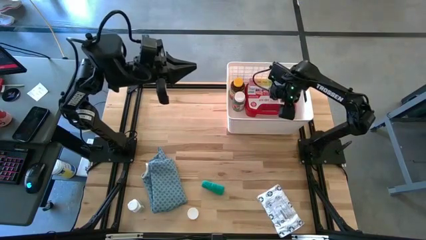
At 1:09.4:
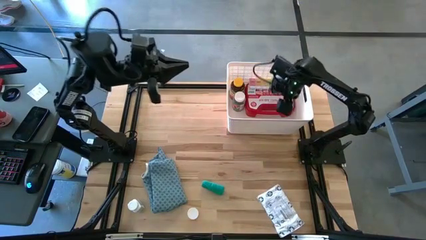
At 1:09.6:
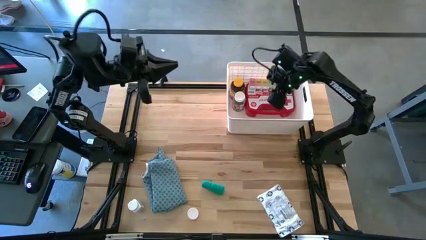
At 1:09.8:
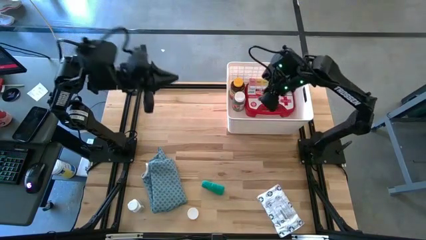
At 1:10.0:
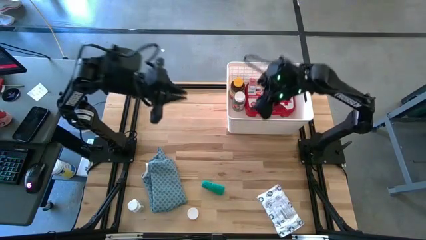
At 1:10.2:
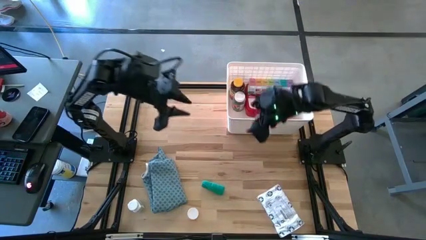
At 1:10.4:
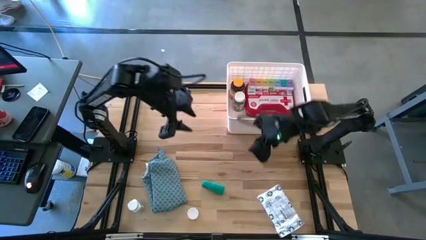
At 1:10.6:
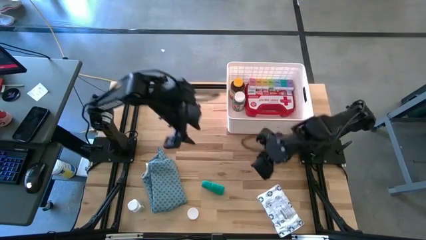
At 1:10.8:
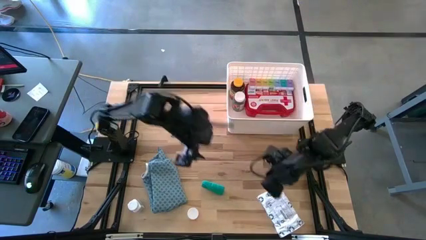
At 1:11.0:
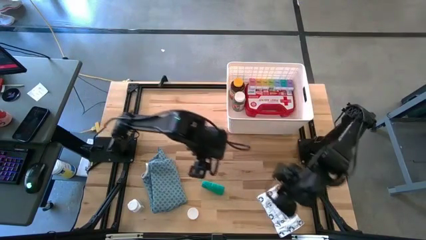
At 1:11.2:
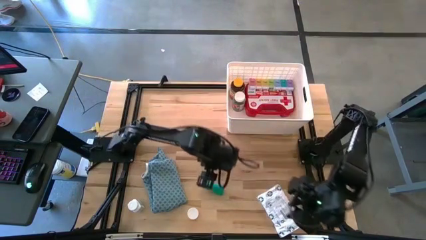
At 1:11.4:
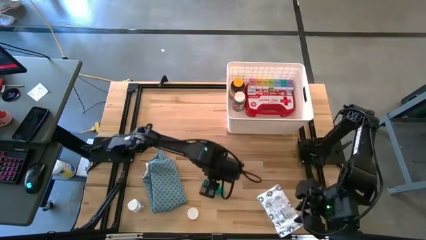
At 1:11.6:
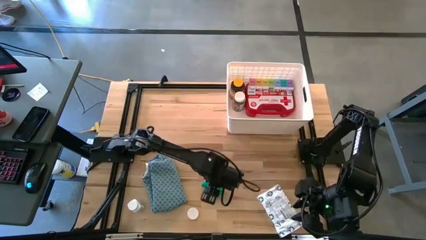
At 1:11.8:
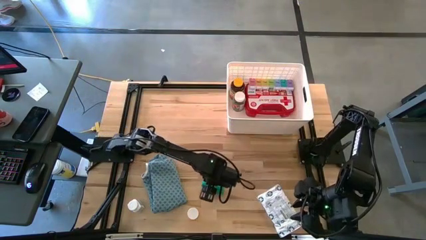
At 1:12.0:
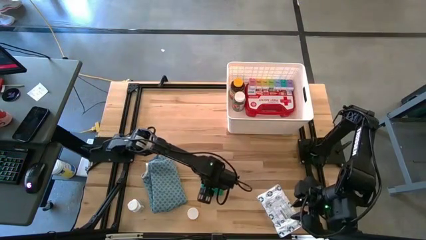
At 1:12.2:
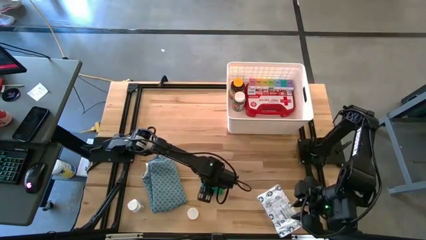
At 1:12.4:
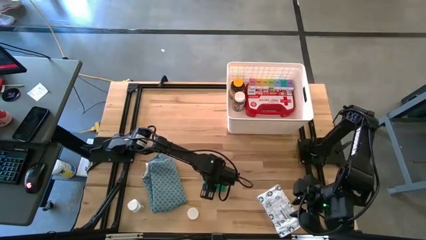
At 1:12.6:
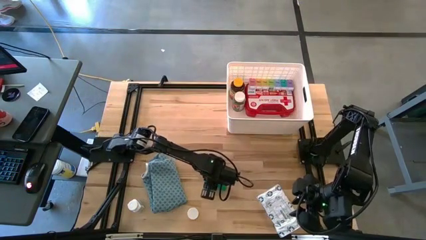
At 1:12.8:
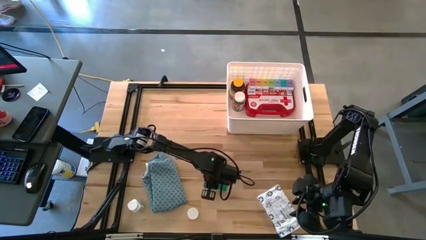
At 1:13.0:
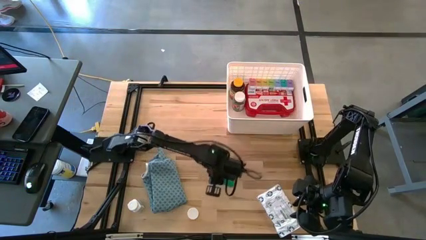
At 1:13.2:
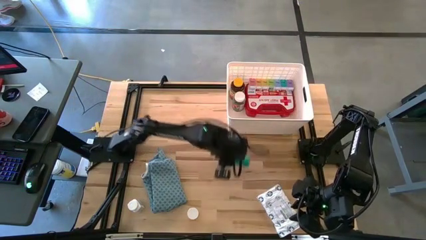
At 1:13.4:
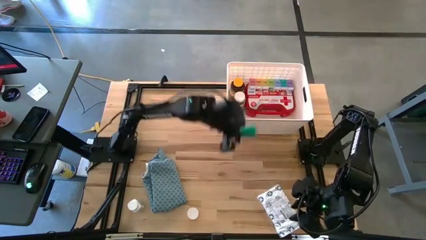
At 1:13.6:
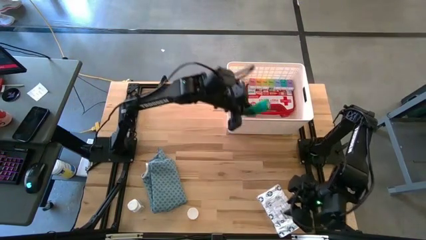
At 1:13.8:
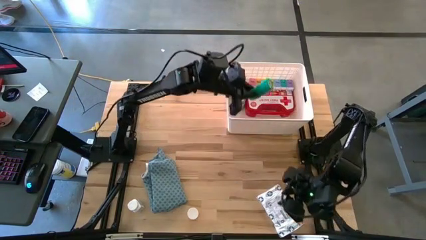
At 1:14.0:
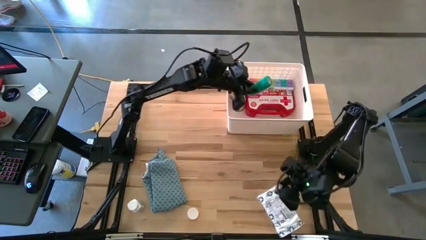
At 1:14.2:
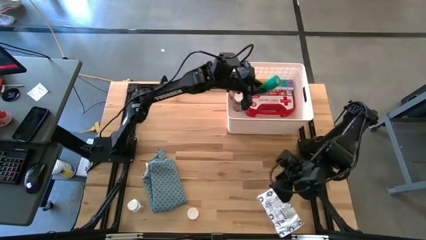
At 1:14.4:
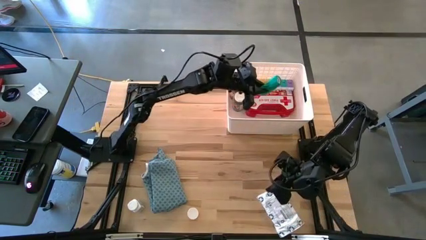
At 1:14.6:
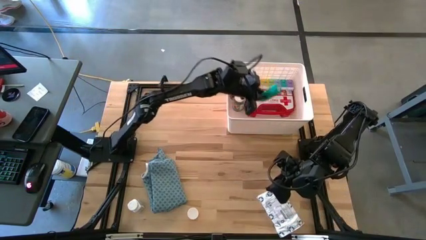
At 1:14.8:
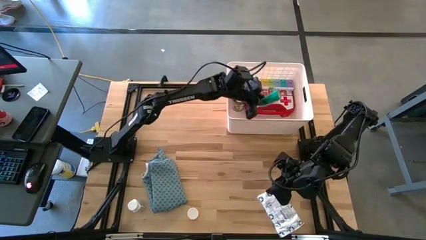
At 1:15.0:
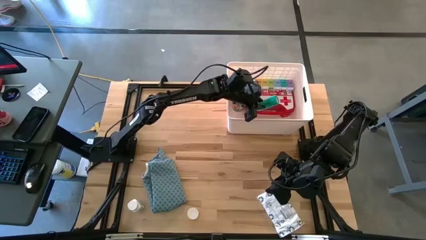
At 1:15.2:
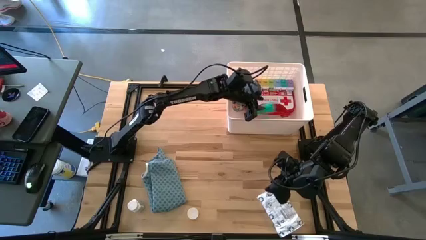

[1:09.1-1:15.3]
Task: Pick & place medical supplies in basket/bin
Put the light green bandage into the white bin

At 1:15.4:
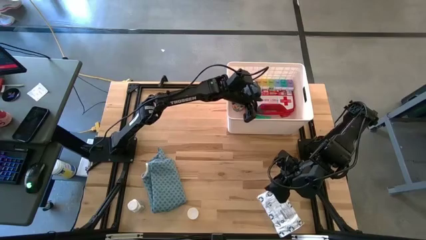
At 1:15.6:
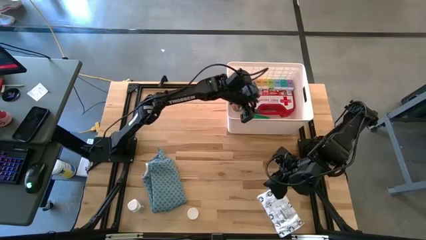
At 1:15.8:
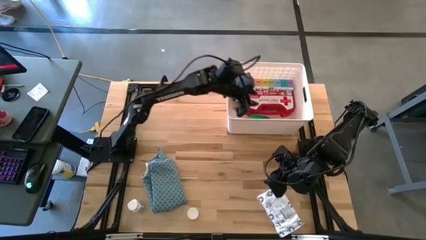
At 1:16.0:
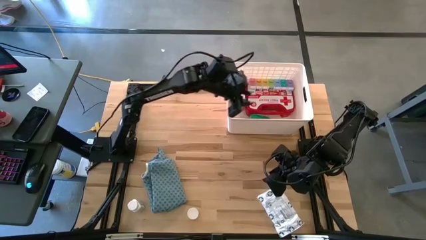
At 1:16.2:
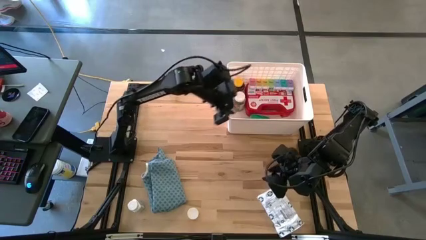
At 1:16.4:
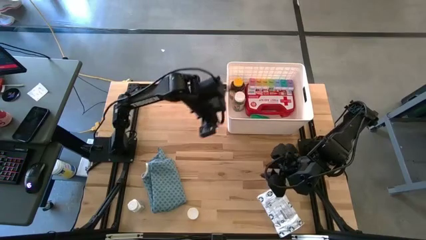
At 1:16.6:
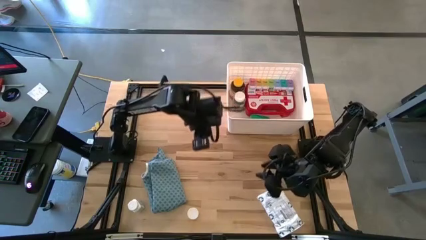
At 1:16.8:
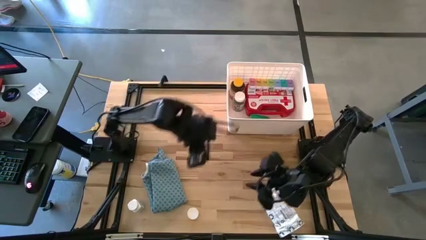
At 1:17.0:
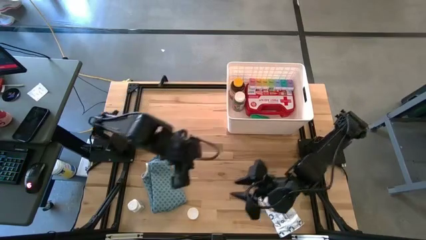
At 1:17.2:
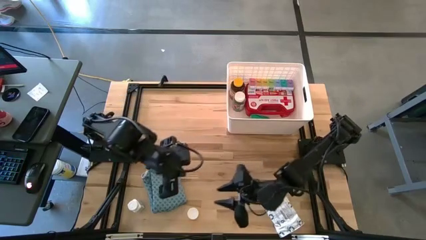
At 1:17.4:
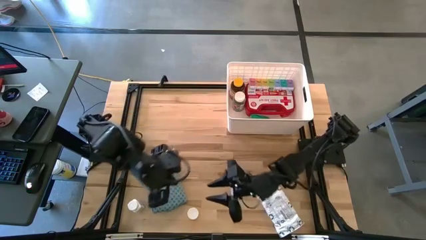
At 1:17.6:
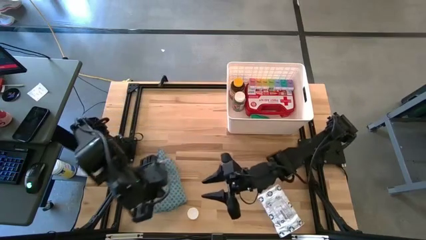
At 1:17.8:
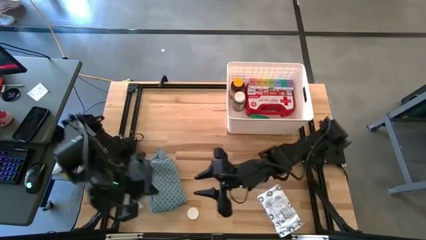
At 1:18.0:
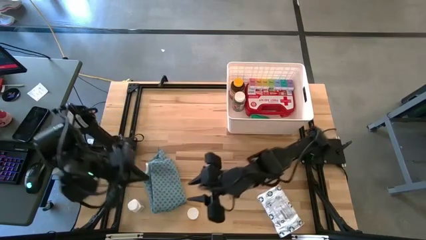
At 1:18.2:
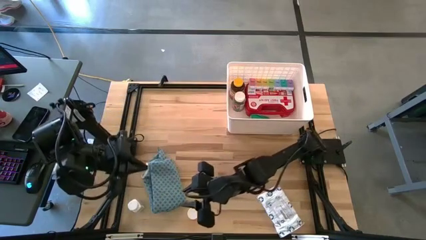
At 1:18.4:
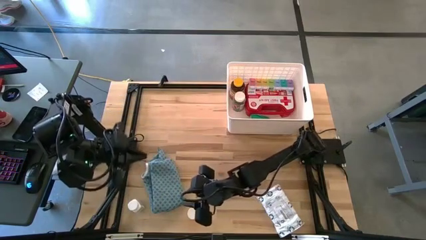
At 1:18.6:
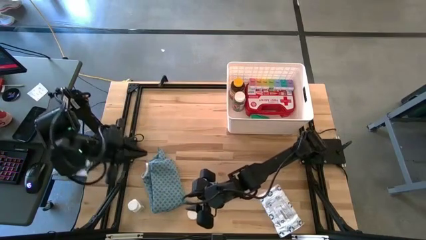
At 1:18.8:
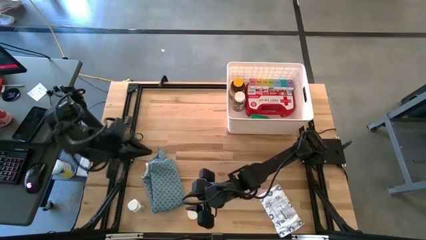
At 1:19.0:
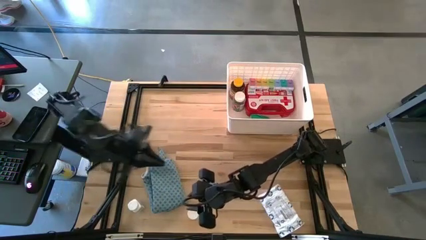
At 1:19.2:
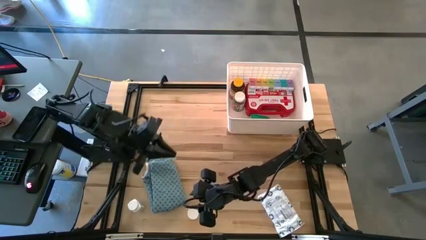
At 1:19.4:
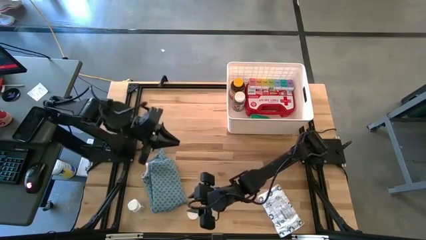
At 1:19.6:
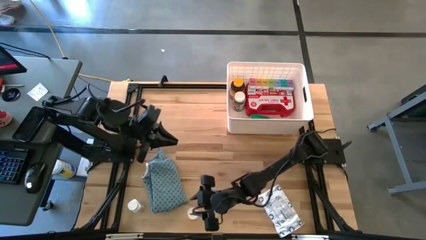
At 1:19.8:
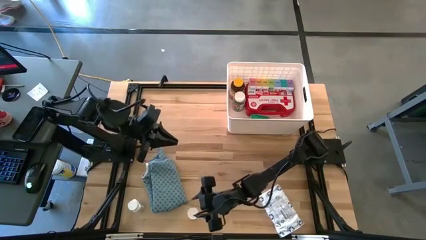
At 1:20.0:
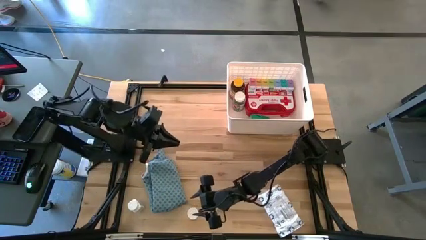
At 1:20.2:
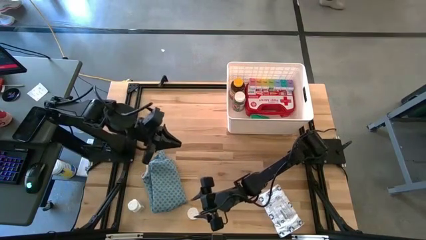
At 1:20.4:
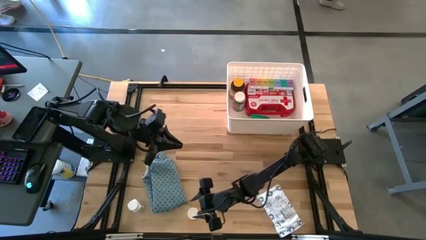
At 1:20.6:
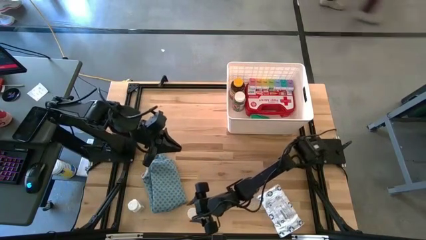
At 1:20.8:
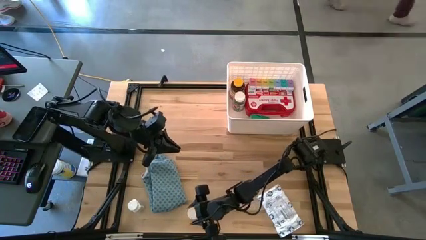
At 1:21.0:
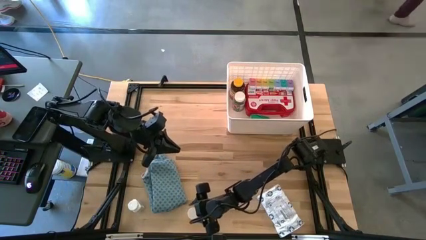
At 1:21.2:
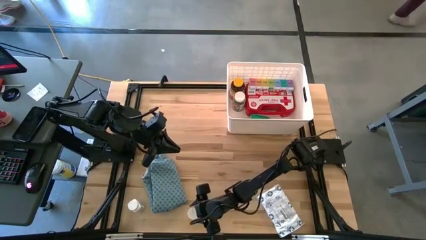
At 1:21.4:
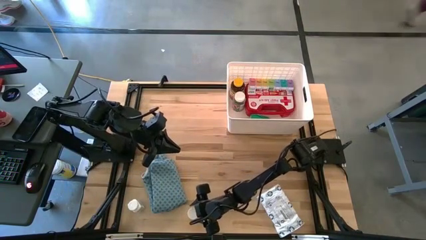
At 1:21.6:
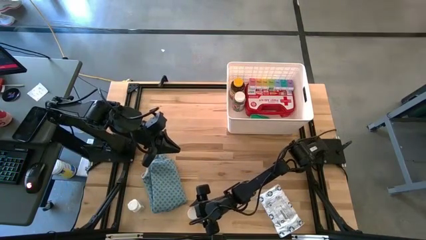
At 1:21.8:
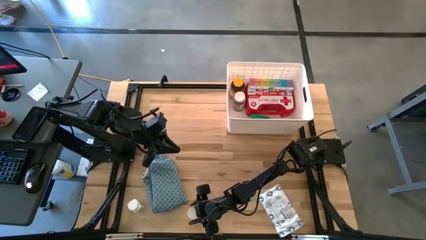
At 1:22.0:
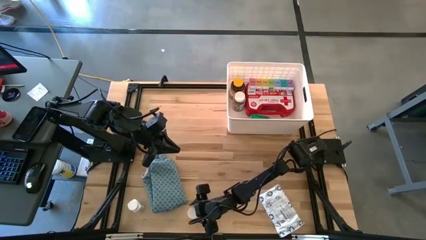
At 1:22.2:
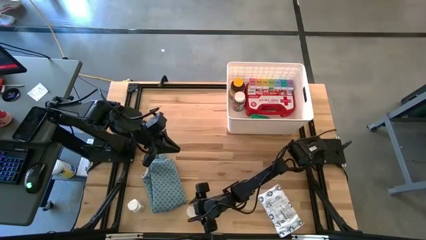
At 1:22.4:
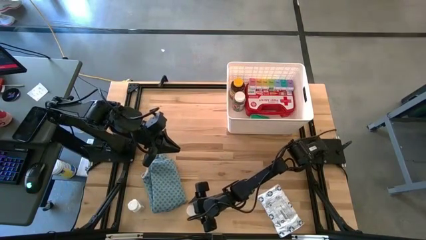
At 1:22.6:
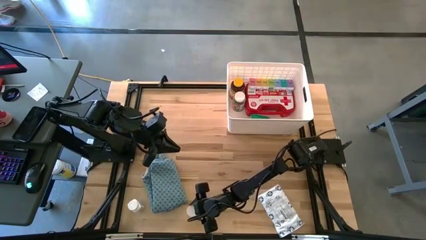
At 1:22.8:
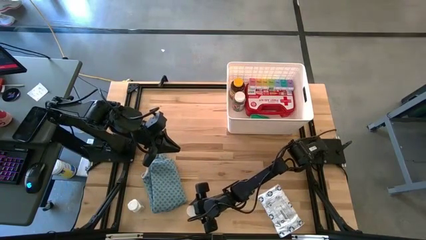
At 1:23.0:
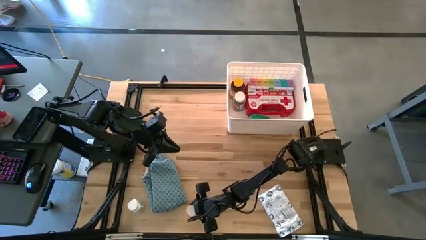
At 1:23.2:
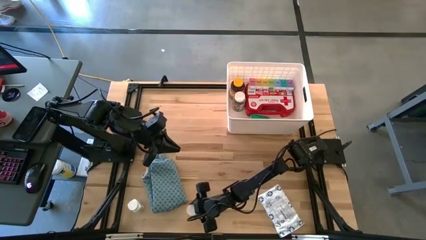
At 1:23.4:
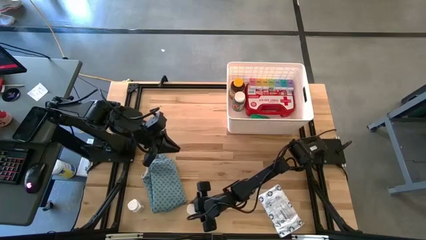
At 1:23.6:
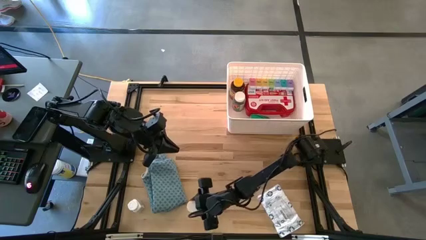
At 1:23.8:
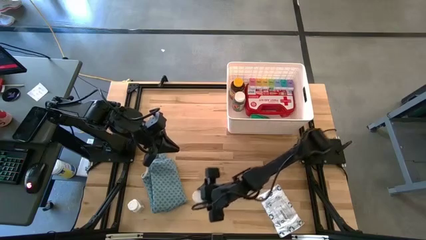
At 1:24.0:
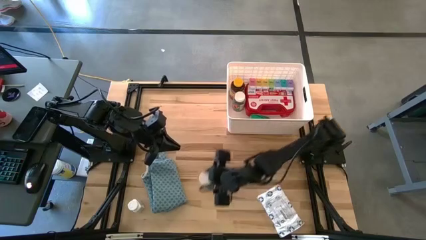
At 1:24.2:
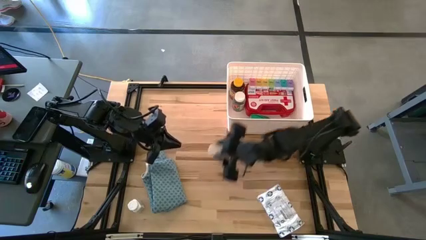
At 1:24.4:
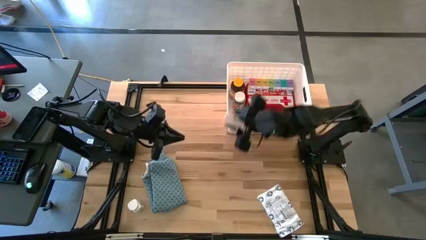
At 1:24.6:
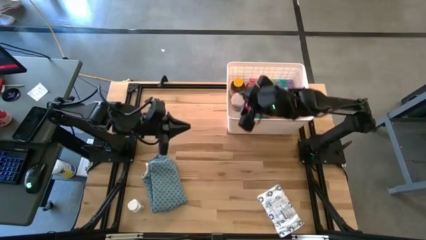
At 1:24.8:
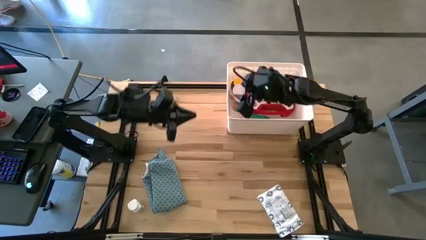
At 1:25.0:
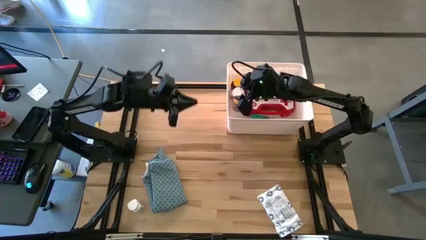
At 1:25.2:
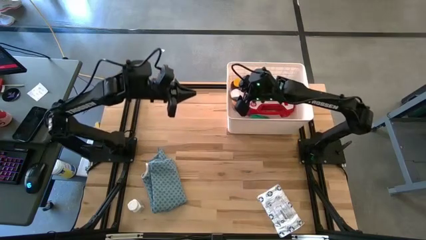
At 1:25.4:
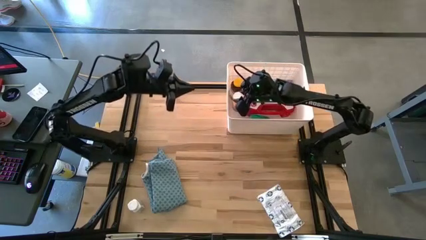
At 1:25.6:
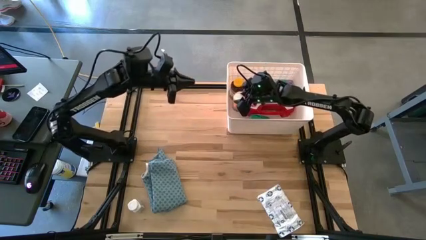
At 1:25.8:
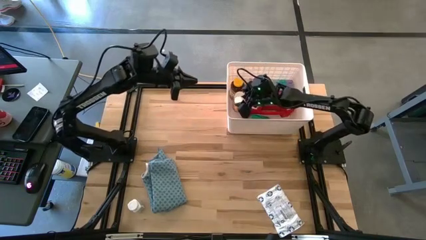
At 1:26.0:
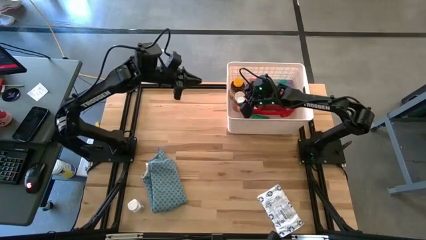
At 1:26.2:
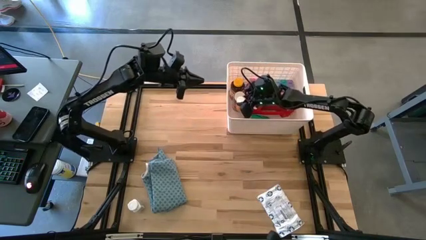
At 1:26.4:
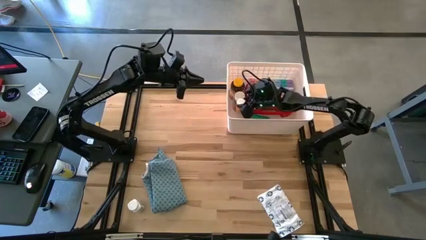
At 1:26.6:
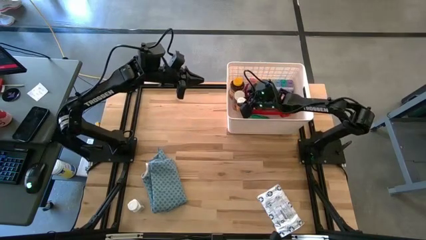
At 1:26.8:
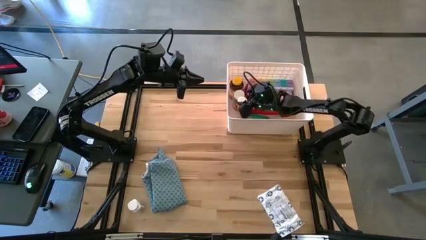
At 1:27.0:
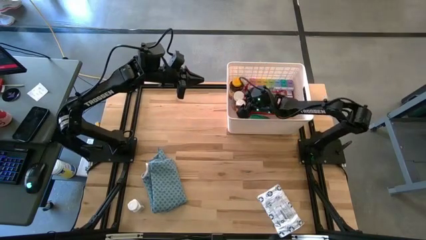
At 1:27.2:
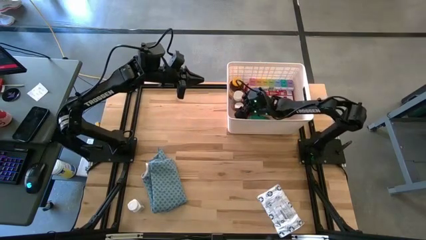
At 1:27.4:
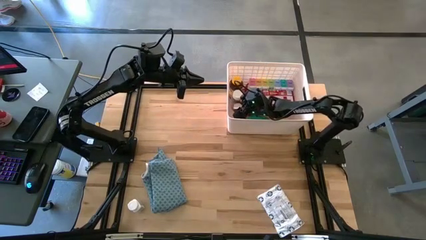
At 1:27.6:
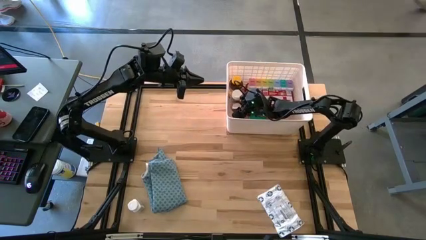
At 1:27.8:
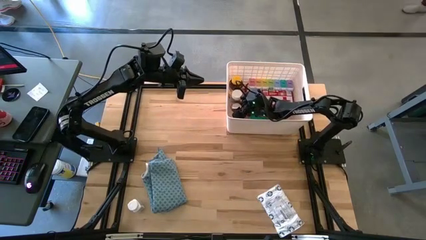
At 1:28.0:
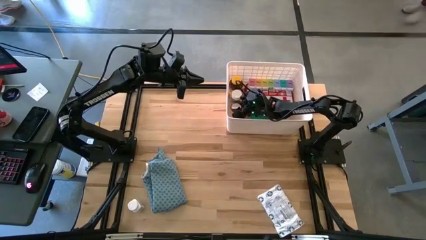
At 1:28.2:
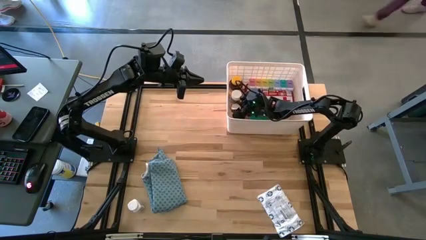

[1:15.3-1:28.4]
Put the orange pill bottle into the white bin
